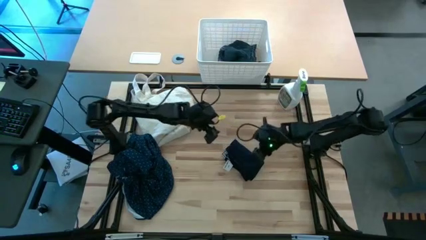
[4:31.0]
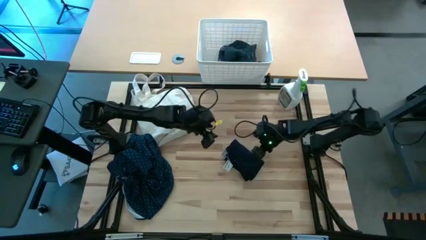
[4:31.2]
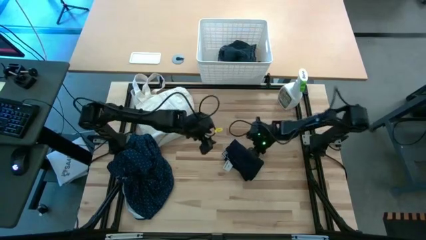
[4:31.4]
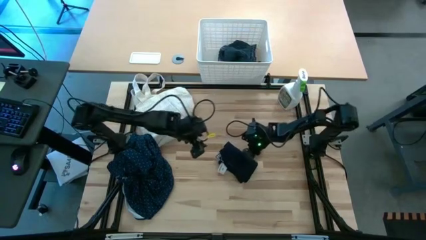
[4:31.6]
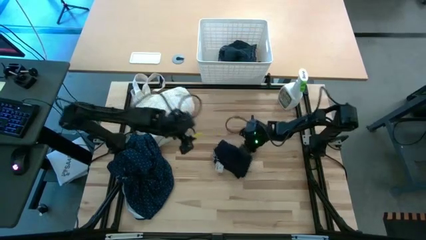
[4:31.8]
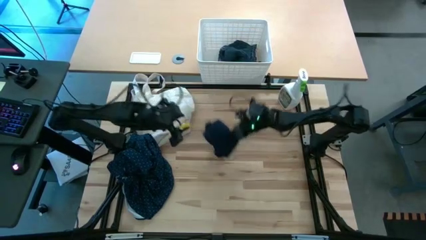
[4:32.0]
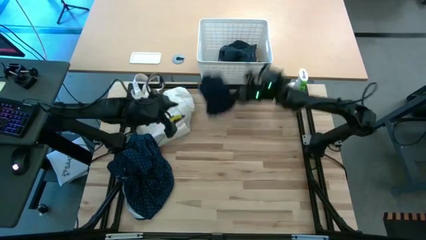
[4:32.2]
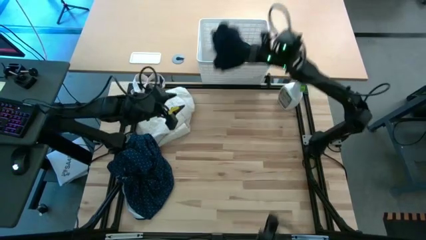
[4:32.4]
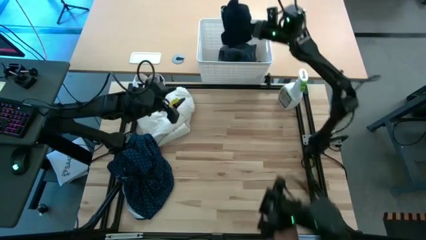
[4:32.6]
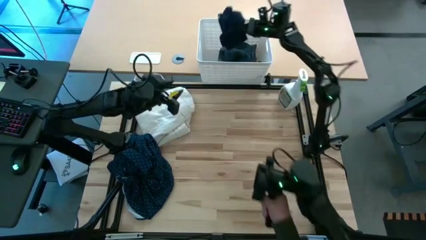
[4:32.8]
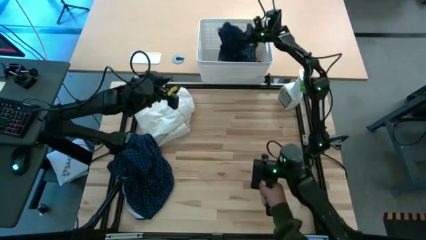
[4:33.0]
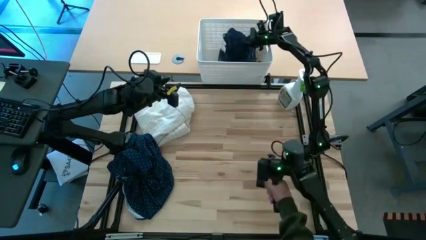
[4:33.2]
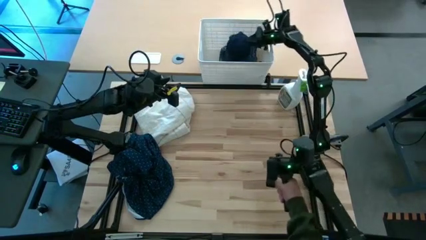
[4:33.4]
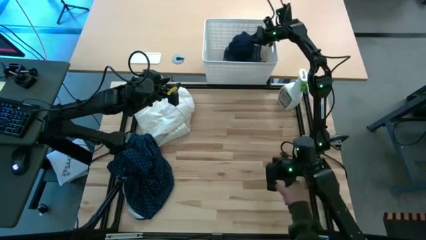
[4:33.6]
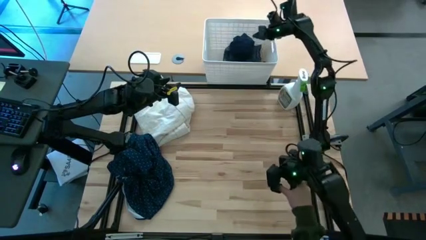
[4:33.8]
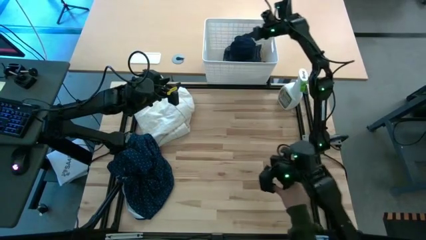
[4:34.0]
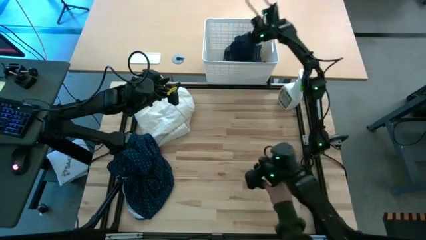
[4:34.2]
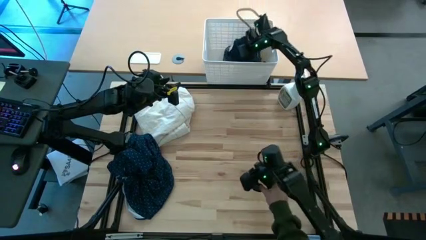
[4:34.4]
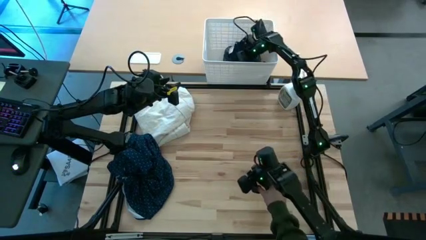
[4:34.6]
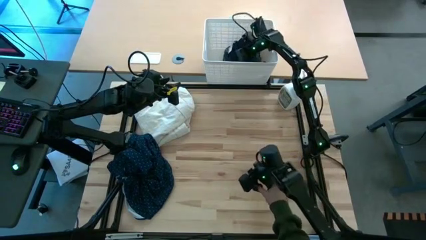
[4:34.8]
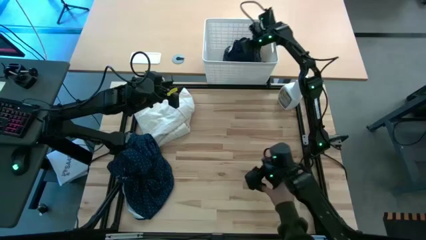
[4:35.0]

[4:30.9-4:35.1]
Put the folded black boxer short into the white bin
